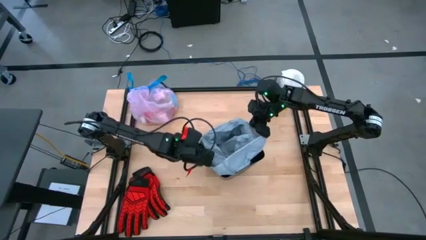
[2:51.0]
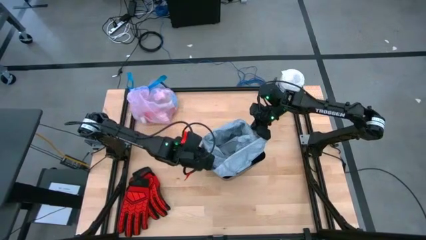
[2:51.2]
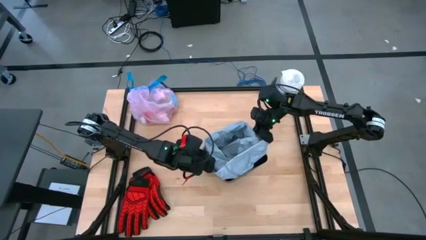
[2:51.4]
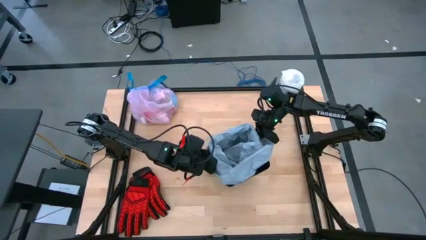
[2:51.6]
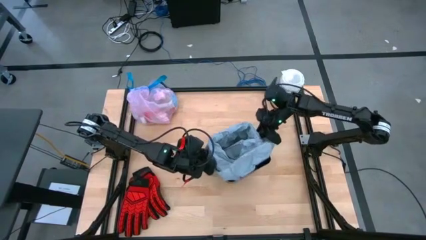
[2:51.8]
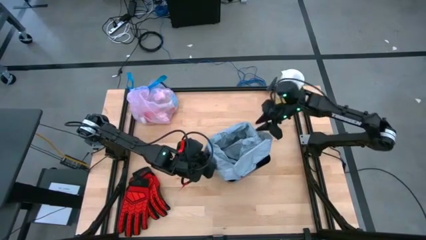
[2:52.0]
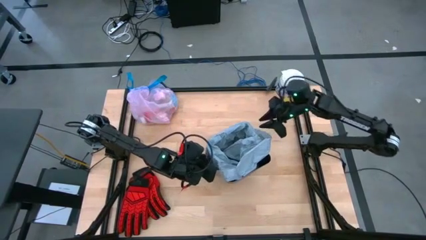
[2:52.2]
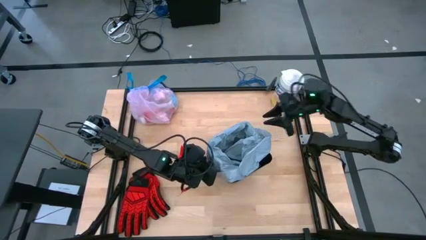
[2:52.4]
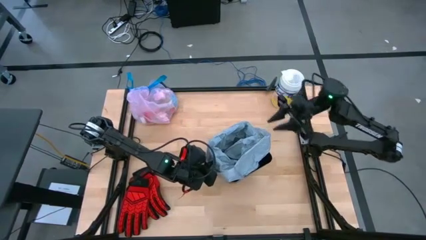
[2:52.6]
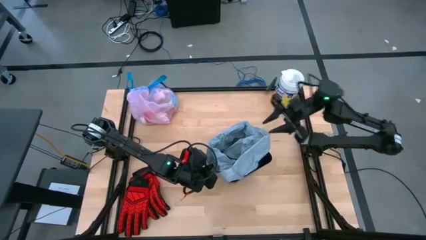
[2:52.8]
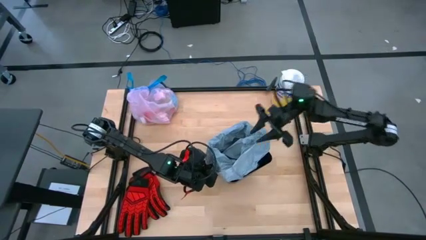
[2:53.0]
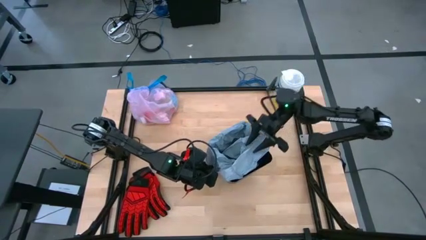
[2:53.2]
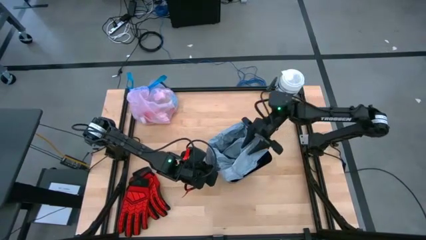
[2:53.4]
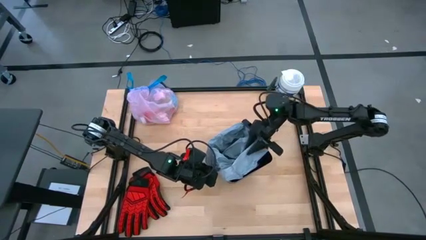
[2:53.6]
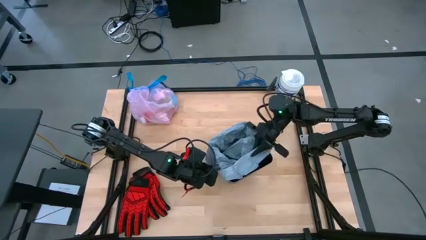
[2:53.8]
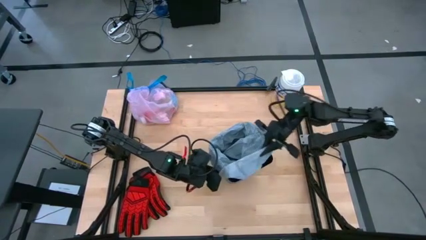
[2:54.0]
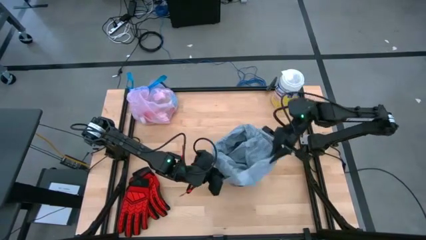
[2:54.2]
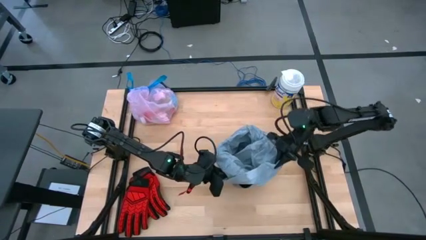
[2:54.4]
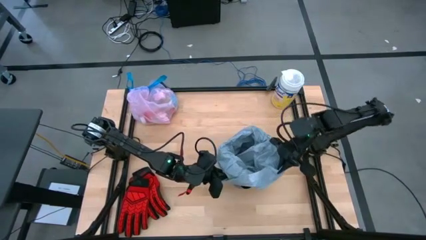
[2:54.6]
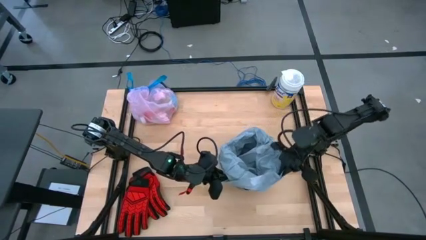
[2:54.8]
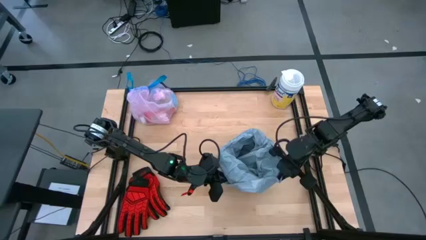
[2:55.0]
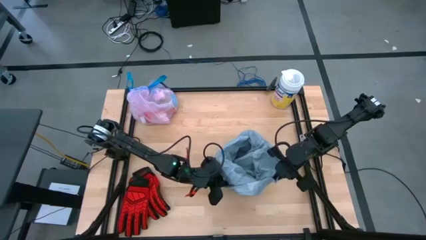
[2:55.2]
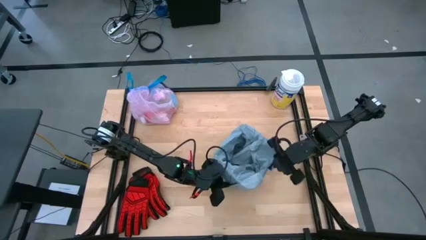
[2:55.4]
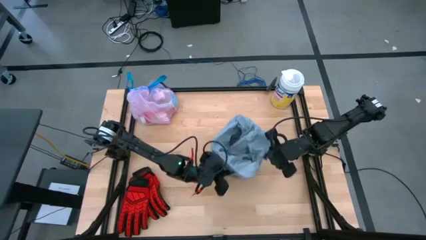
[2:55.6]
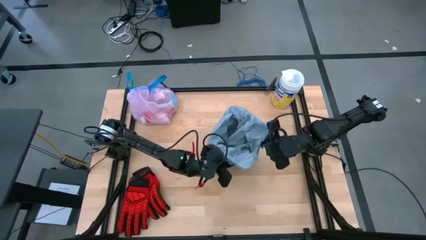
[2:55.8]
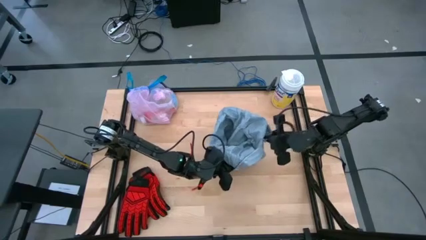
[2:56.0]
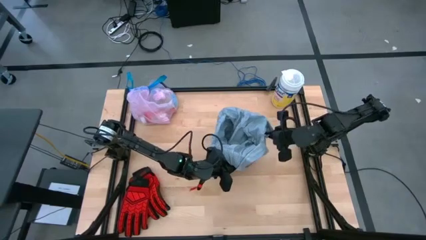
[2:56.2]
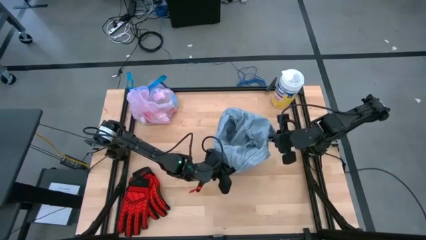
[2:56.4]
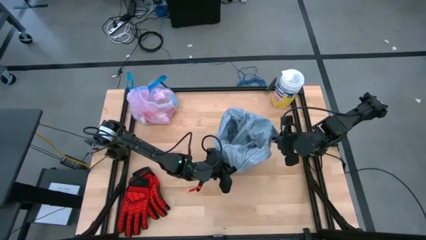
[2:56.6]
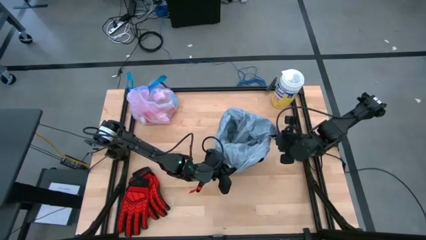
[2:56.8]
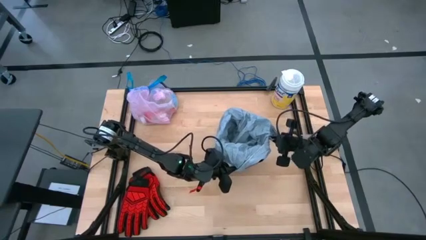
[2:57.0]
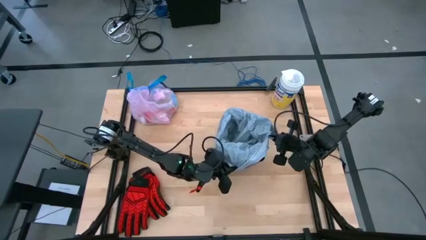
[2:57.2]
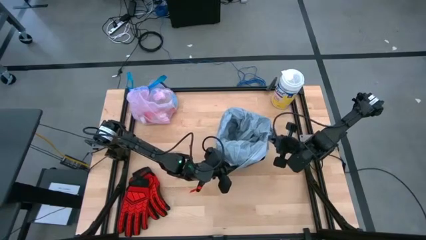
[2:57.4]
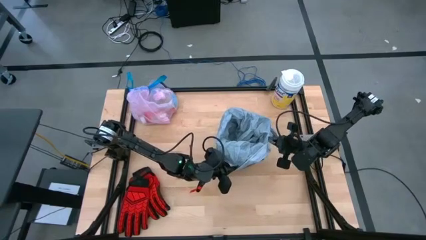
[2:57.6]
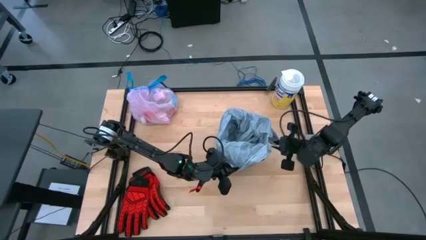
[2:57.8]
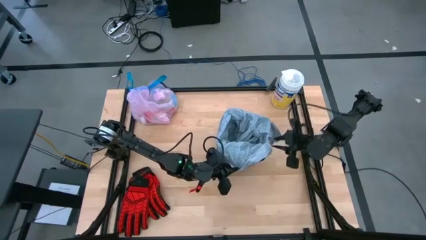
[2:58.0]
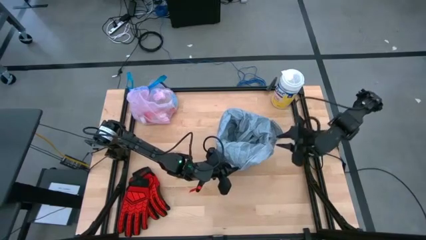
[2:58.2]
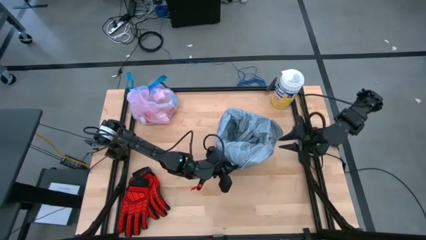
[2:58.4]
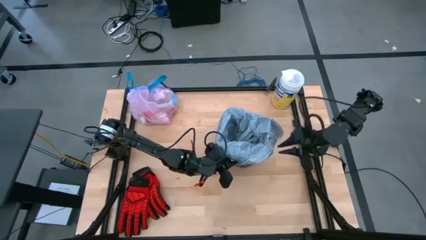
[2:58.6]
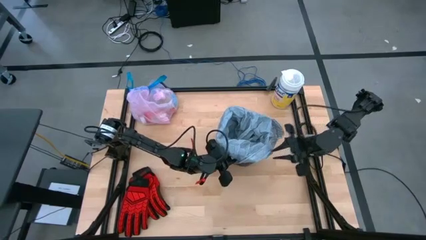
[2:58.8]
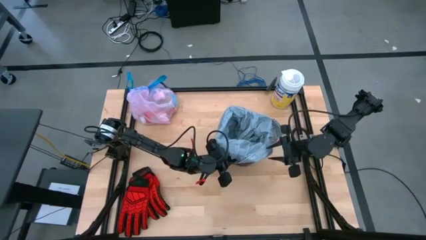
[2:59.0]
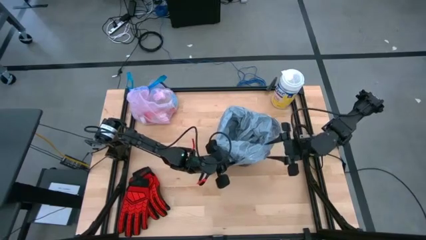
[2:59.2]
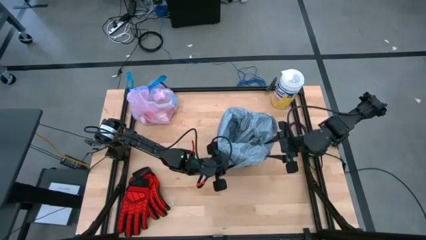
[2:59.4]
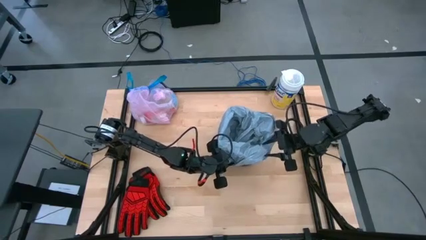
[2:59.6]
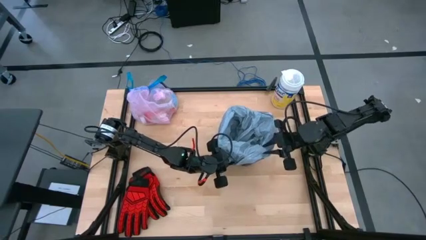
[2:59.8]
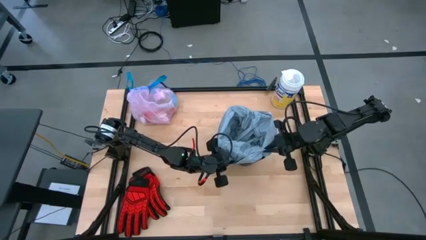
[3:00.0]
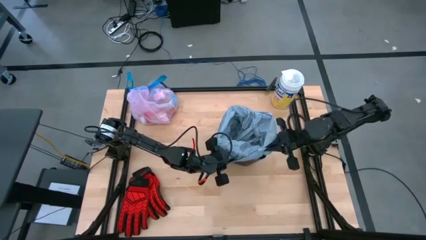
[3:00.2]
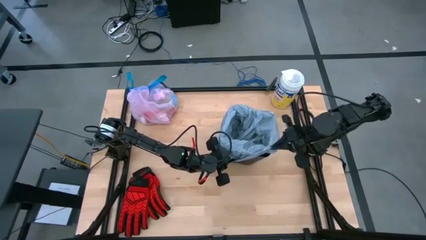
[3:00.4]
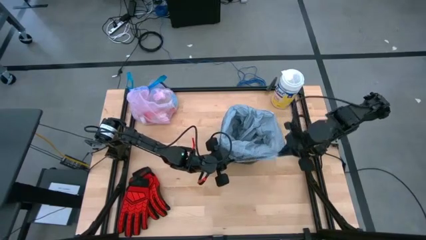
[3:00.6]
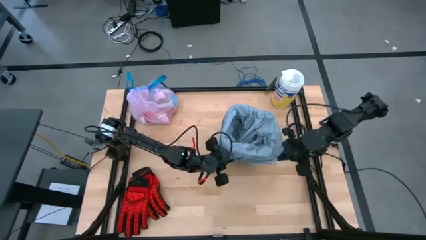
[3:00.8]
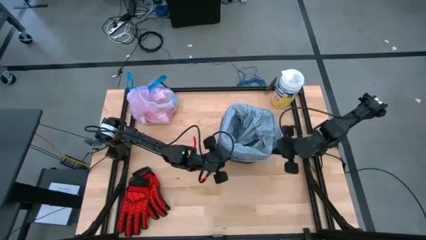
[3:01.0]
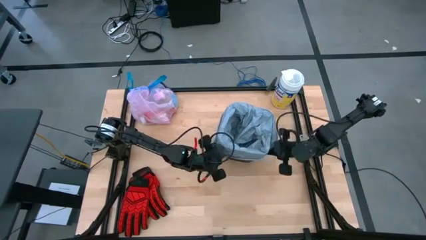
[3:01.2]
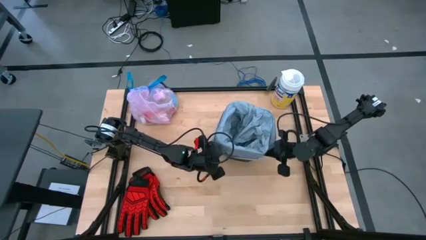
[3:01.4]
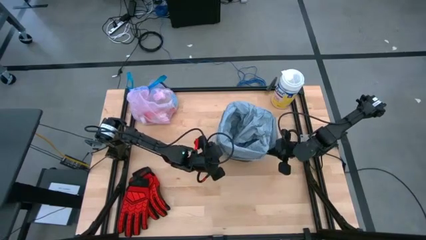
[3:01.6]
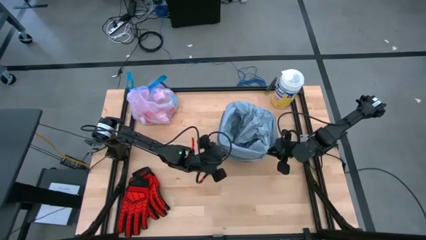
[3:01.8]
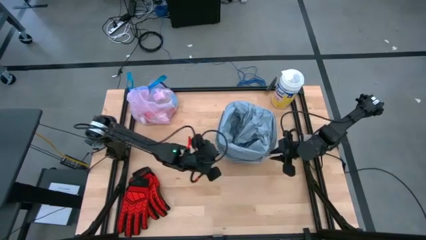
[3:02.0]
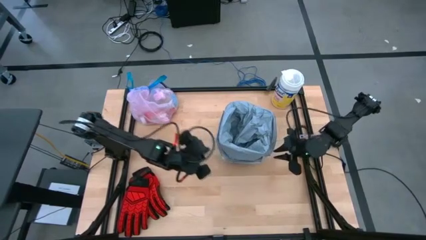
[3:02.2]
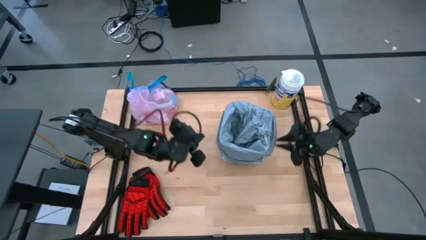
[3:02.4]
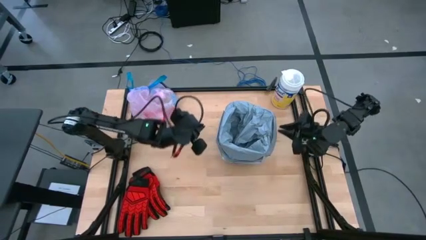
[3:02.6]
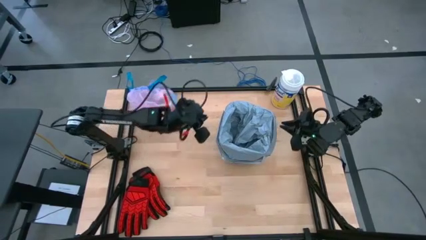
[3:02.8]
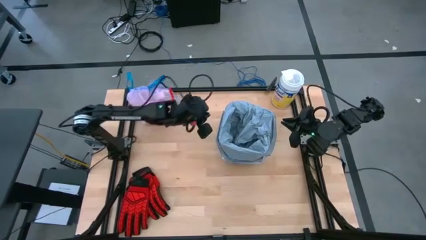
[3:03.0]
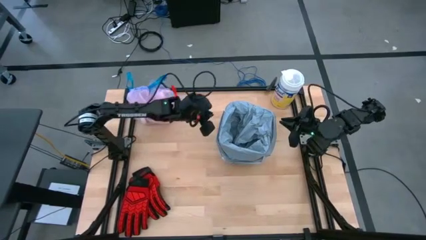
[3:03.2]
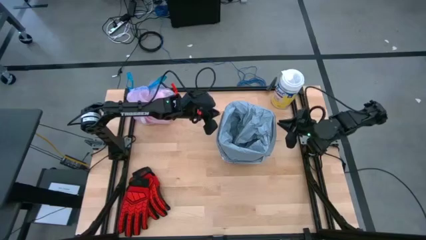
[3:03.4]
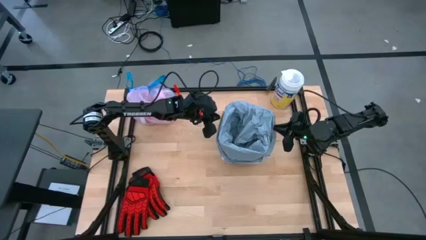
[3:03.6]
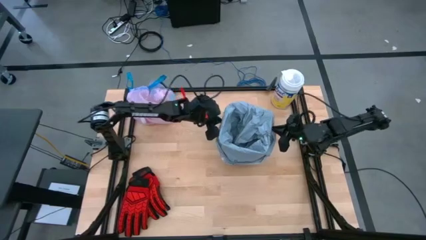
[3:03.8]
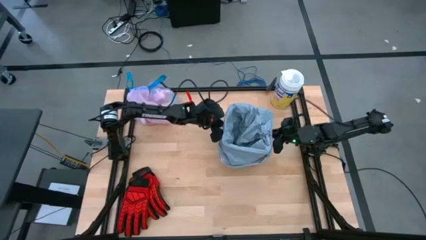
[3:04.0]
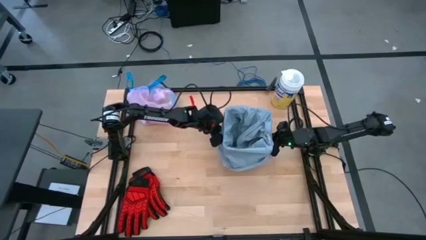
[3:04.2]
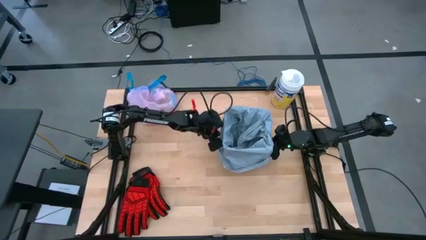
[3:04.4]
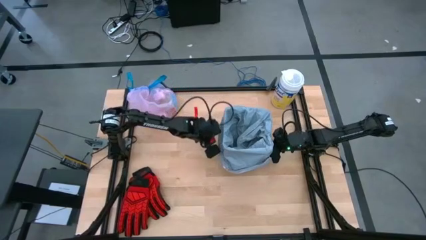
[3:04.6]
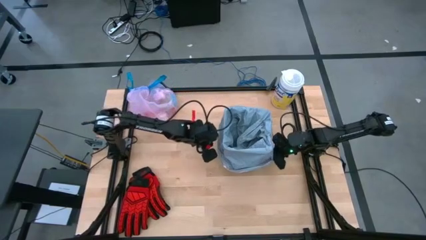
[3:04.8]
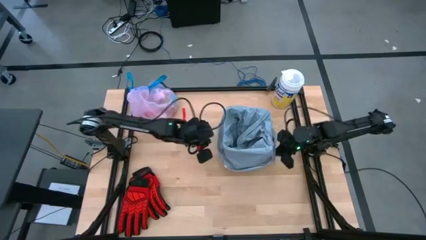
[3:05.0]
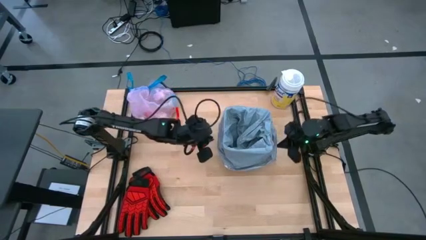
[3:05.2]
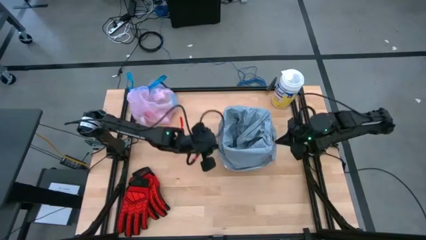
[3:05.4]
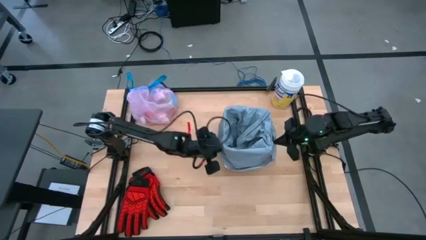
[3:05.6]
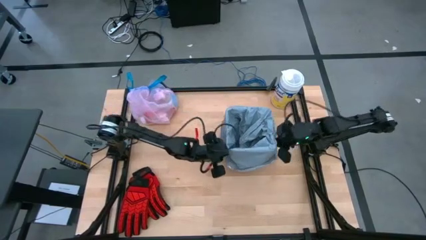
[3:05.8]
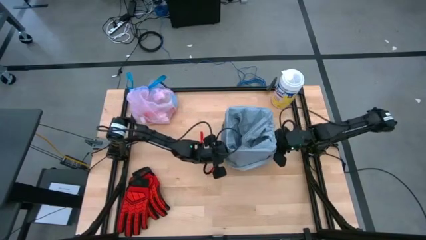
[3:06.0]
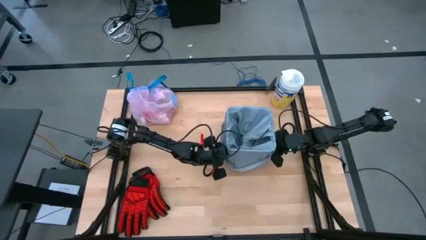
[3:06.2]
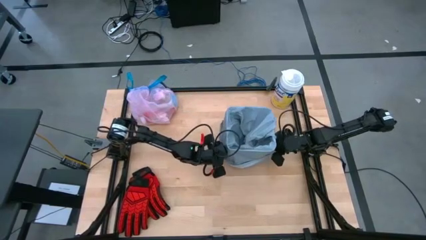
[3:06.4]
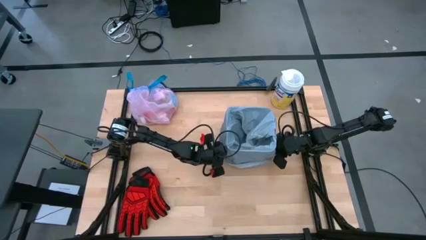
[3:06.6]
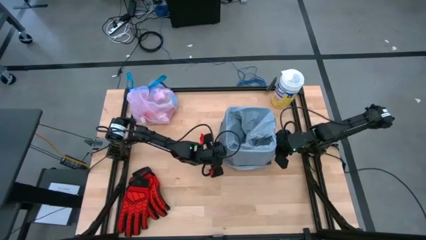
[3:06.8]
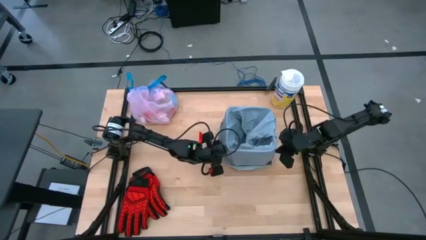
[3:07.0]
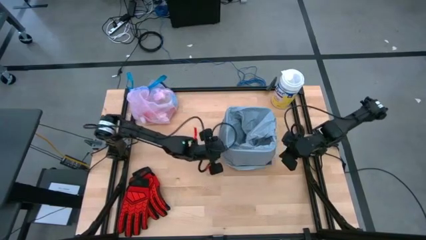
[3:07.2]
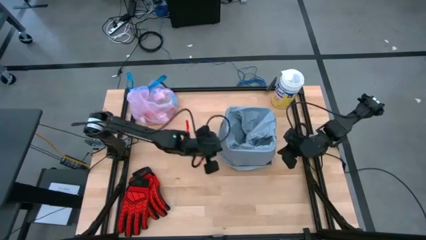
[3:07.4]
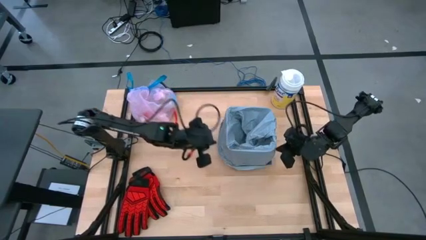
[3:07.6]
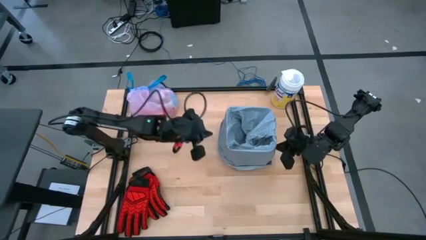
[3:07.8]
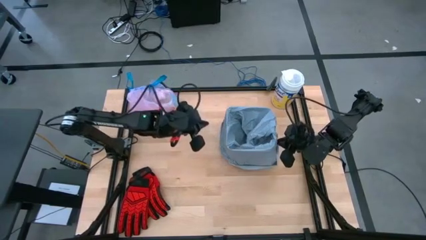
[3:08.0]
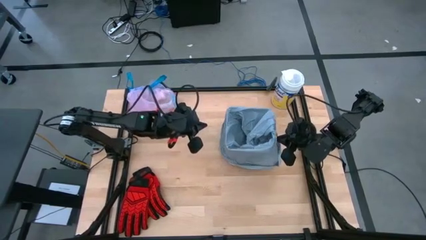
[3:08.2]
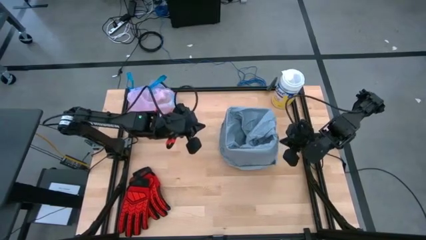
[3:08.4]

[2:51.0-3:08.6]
Task: place trash/remove bag and relplace
Put the gray trash bag into the trash bin
